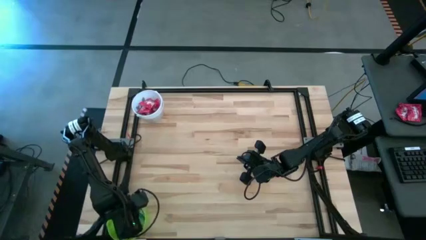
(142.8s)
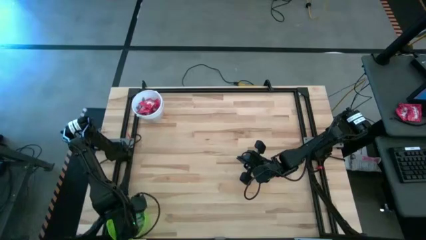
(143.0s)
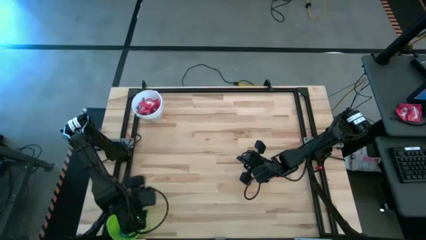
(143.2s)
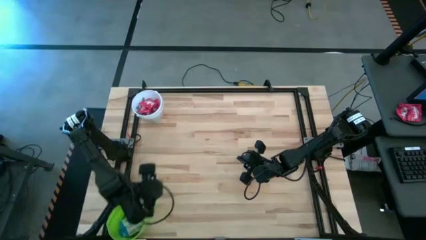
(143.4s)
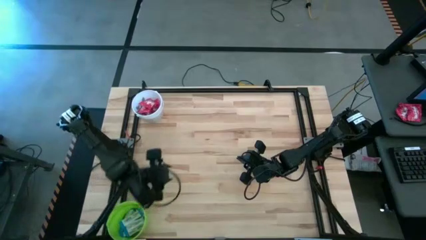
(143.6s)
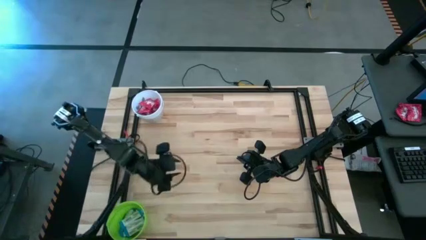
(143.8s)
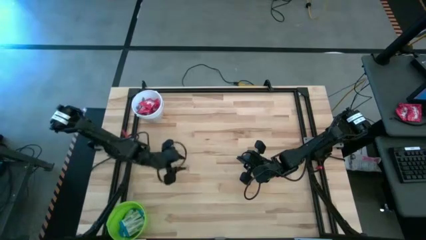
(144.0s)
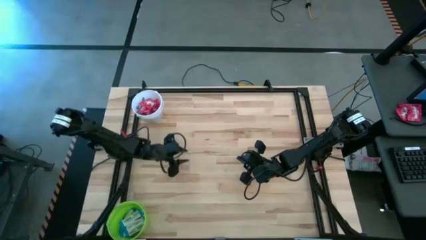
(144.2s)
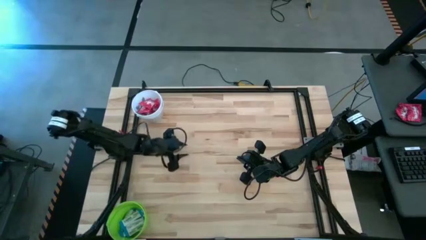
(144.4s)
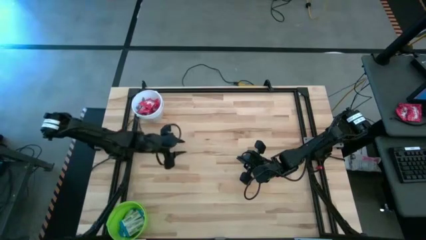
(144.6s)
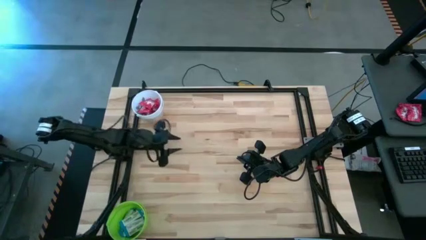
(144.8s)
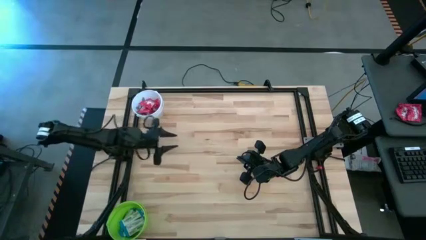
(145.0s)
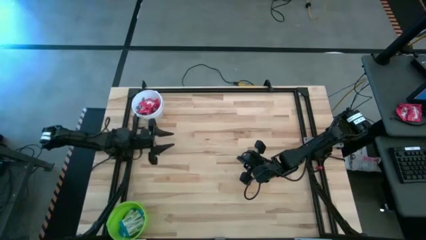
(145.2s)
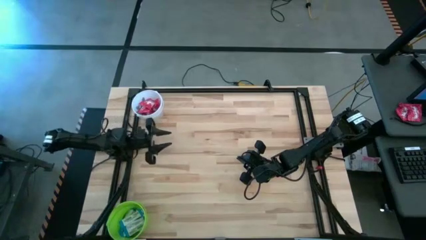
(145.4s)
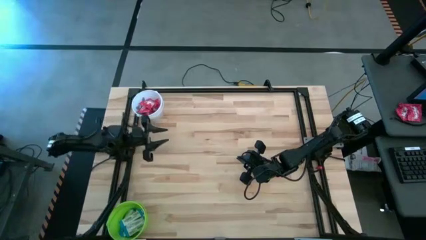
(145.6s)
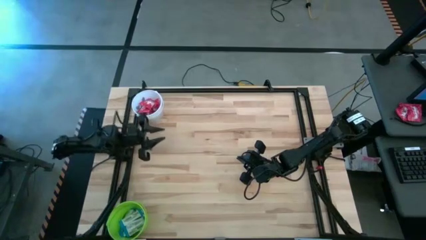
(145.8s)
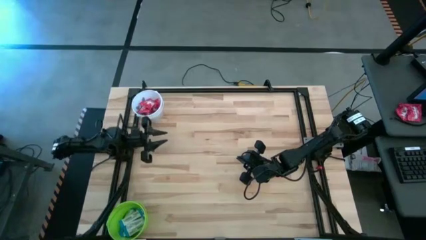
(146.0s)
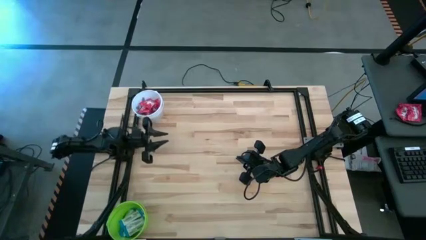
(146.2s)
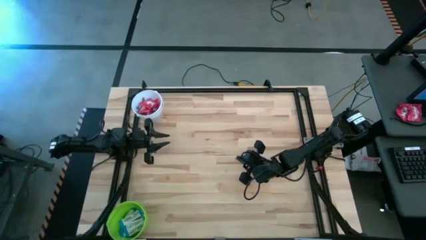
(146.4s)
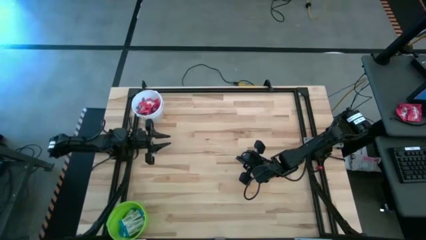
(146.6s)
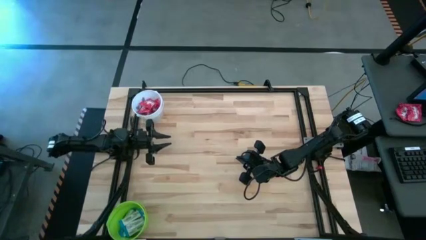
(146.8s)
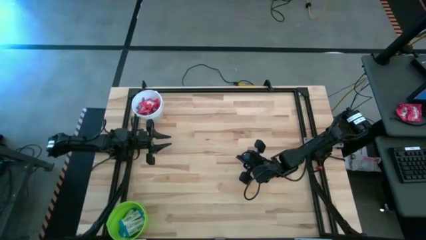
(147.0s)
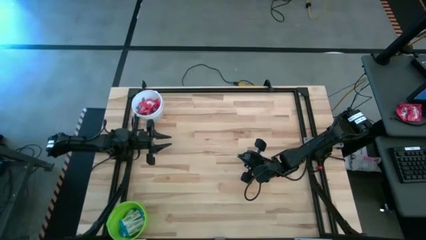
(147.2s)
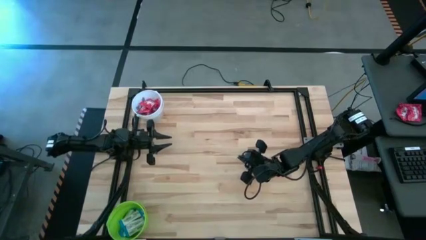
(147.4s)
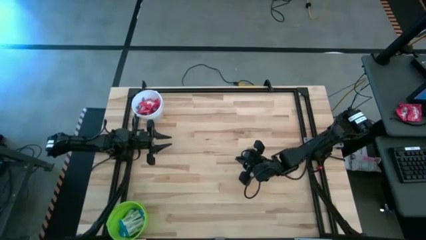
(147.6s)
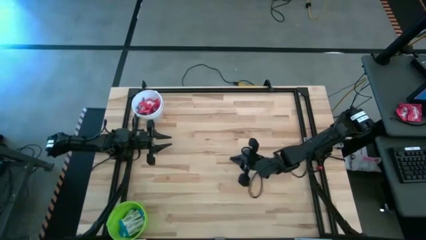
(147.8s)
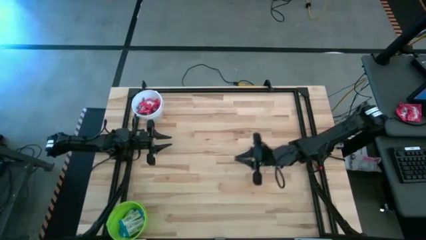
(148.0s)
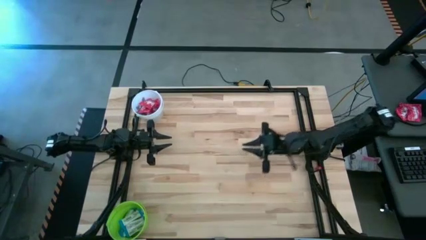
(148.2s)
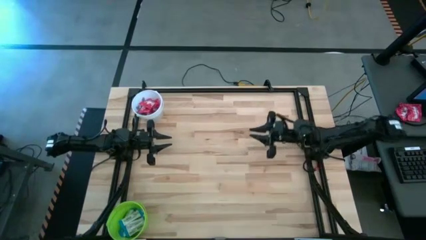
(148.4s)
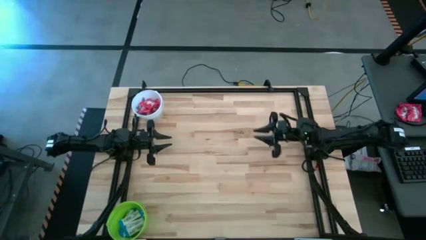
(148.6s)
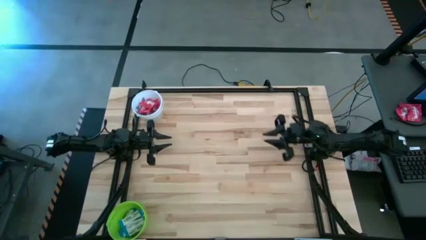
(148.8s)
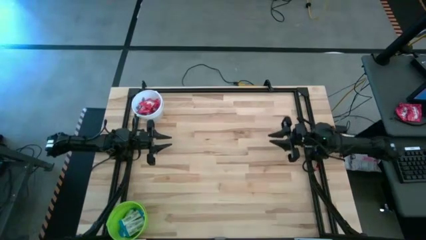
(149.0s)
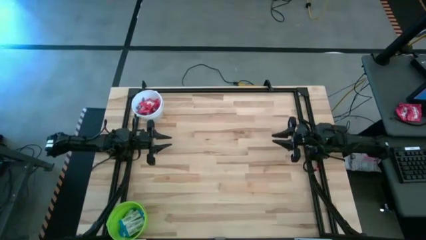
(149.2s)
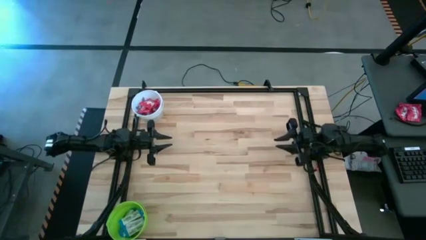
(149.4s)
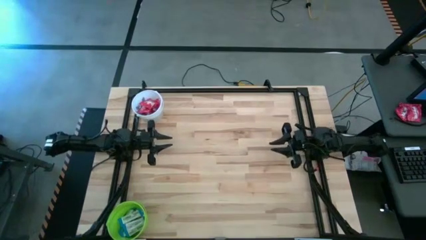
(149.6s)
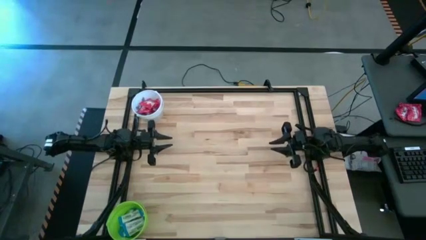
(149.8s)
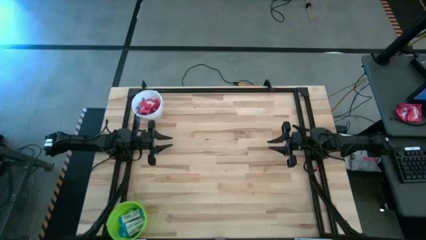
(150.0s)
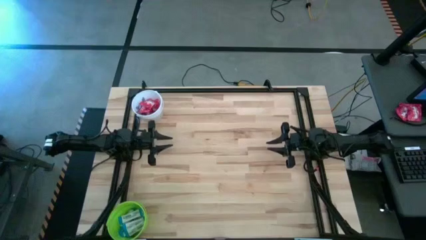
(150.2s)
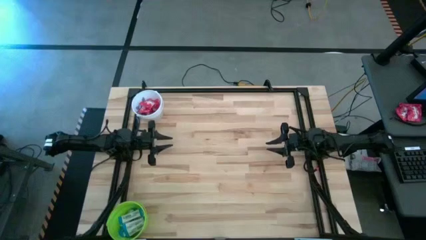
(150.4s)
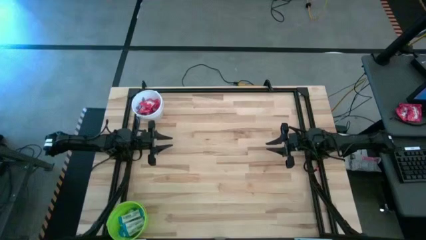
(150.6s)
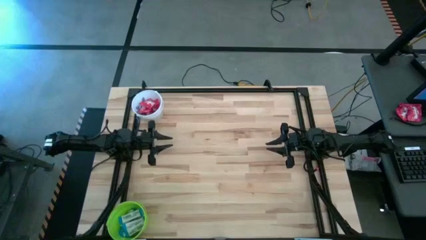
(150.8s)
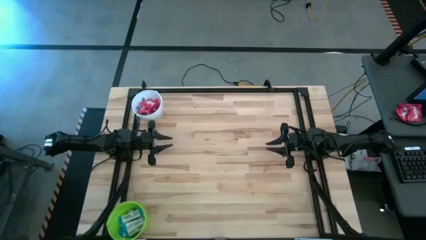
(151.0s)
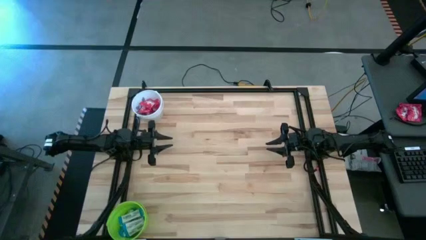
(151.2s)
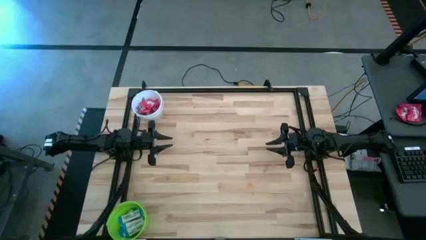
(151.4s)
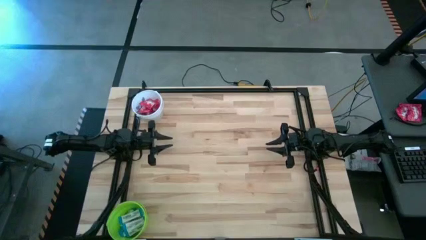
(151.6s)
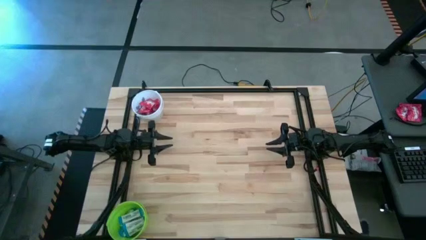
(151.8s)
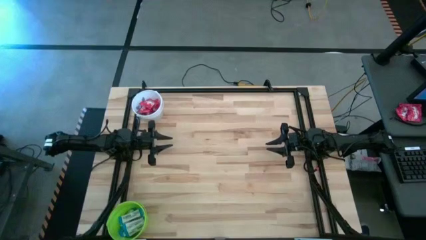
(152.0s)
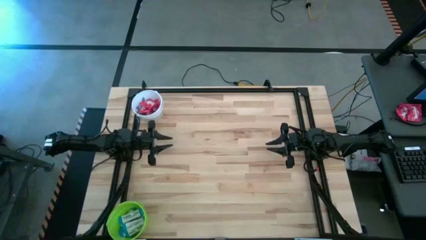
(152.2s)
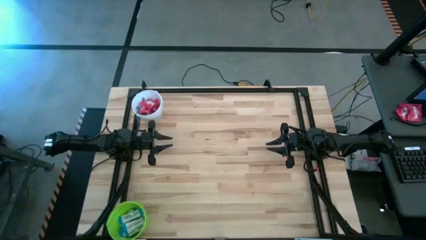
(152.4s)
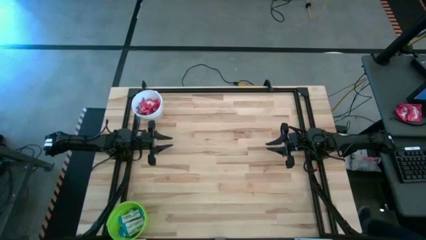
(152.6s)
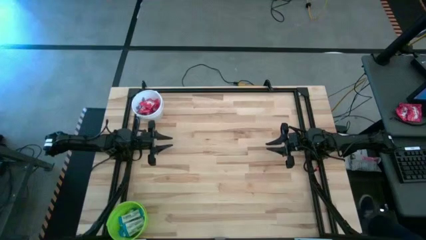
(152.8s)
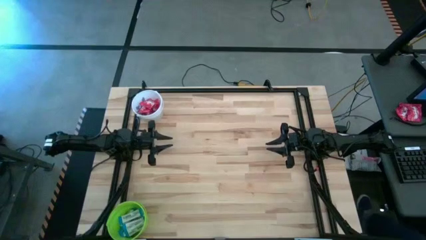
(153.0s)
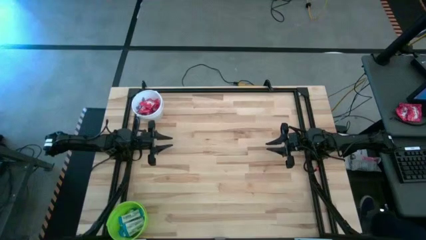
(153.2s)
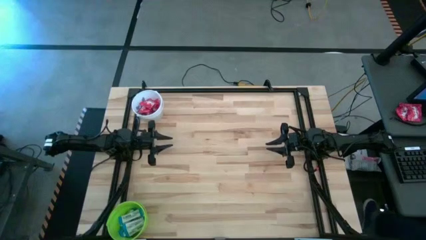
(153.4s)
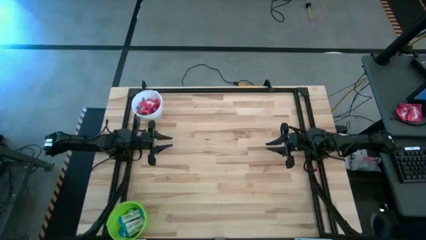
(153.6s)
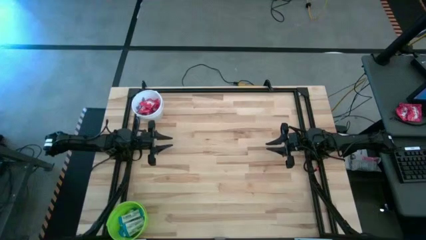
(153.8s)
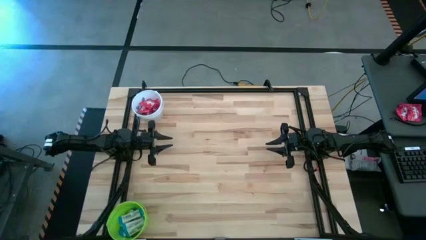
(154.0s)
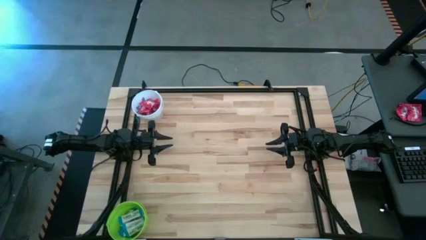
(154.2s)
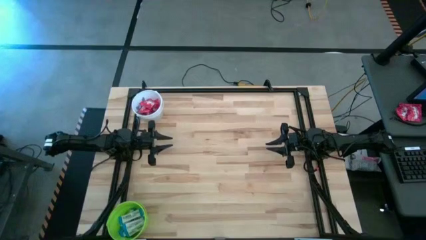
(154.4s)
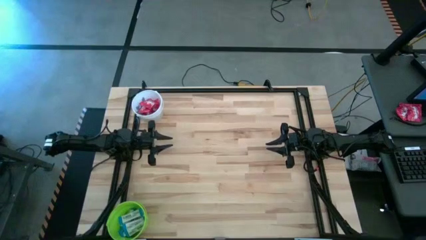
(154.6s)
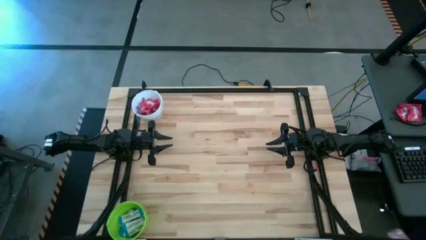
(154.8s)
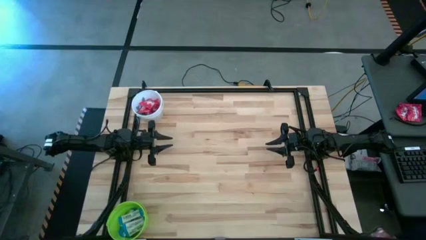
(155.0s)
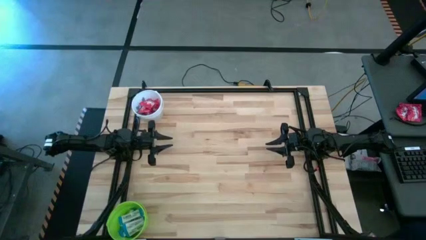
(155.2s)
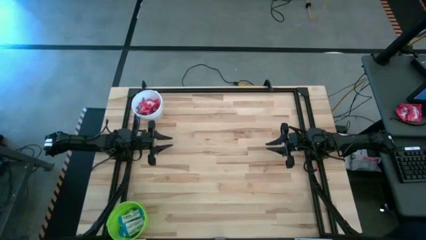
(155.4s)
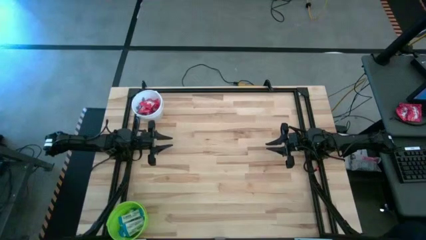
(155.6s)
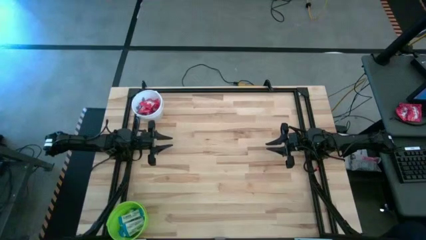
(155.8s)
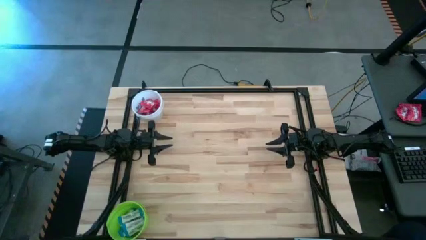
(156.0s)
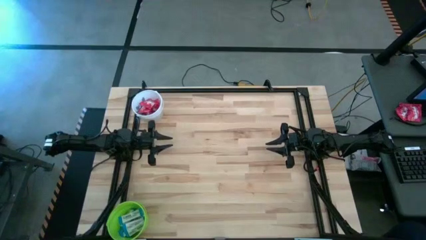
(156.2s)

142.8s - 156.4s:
Task: Sort candy by brand, put in halloween buckets
Return to Home Position
